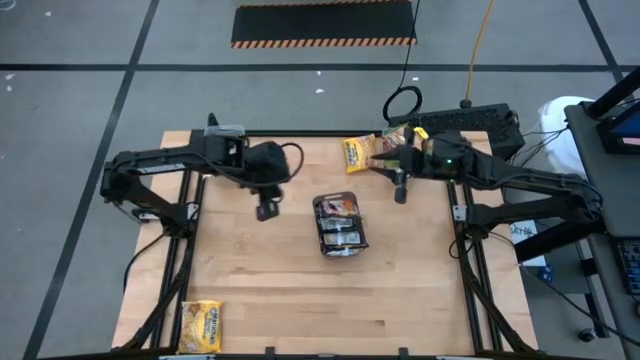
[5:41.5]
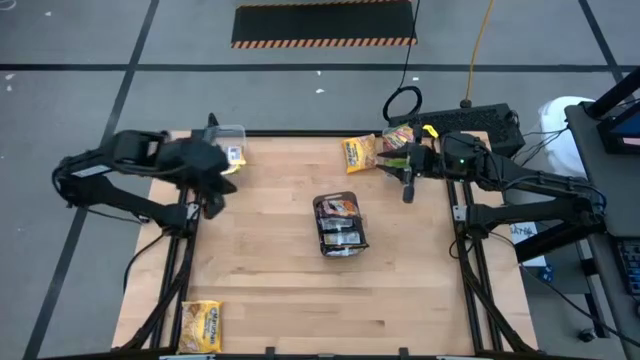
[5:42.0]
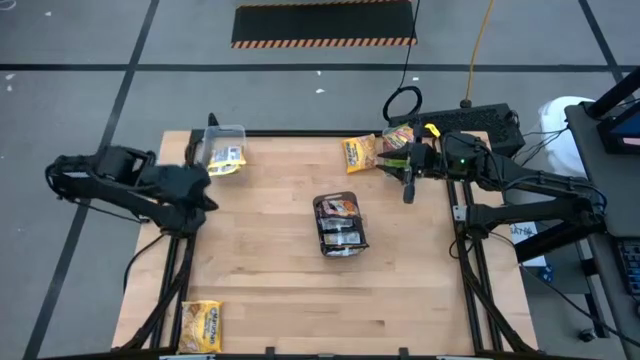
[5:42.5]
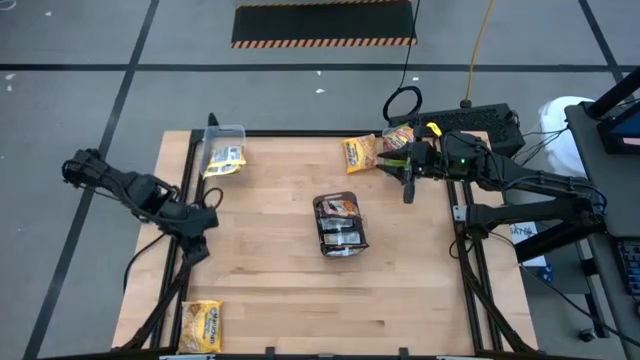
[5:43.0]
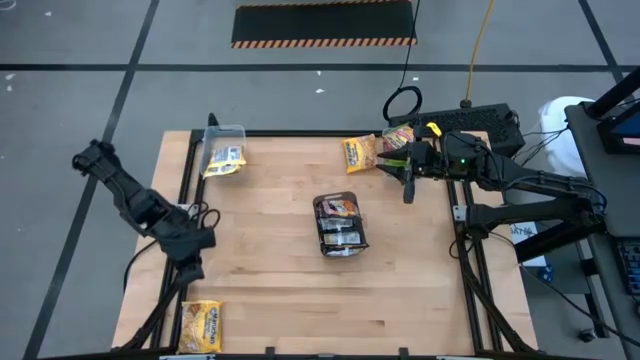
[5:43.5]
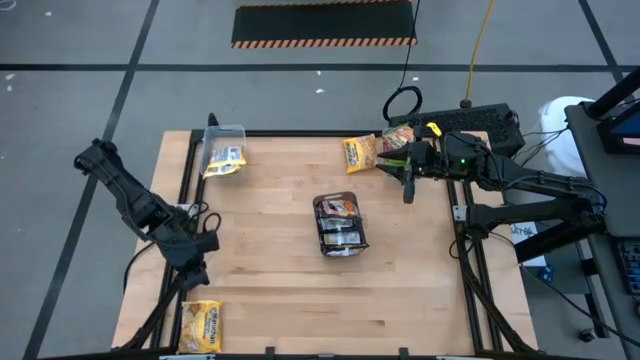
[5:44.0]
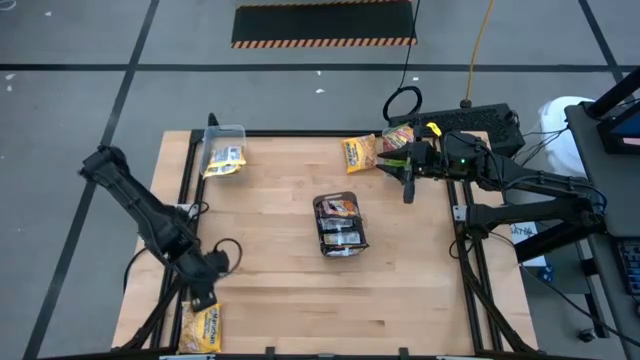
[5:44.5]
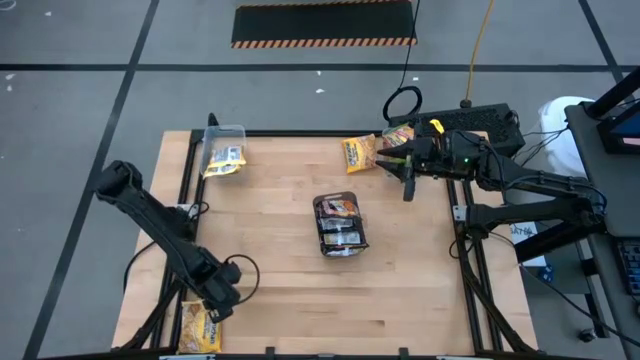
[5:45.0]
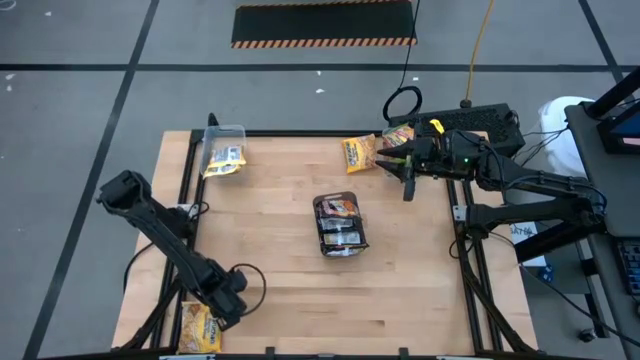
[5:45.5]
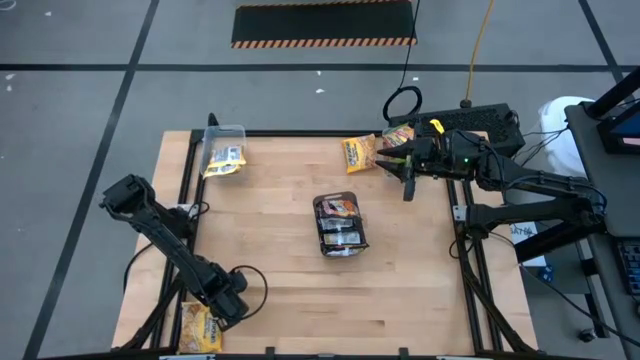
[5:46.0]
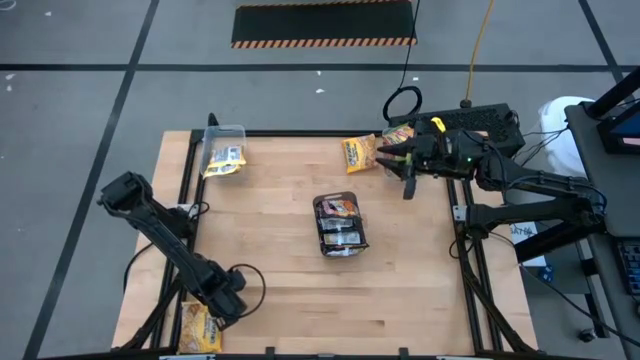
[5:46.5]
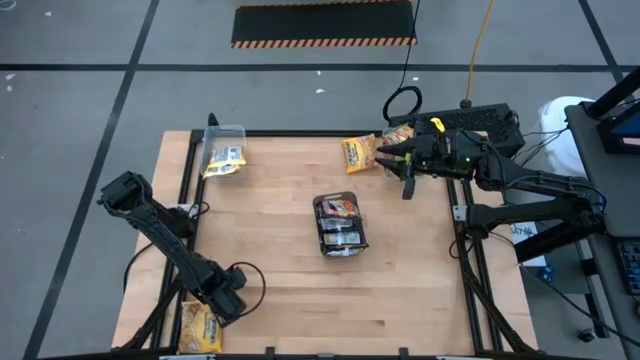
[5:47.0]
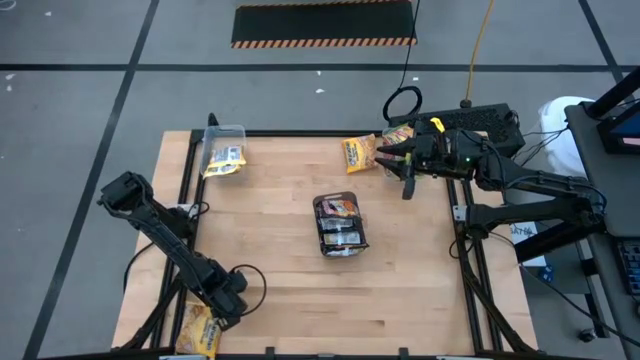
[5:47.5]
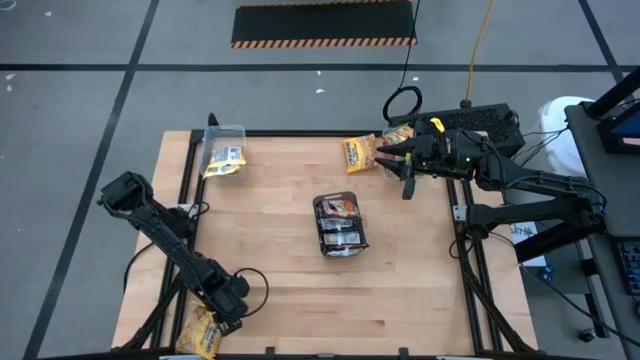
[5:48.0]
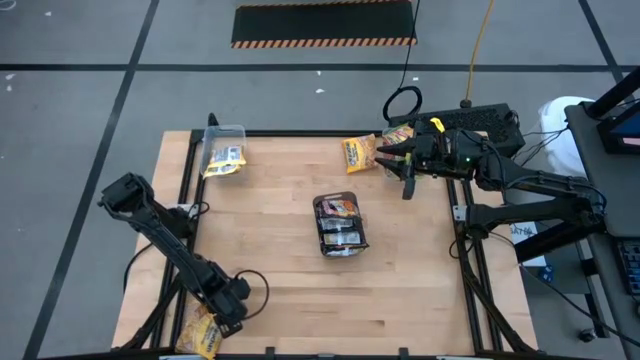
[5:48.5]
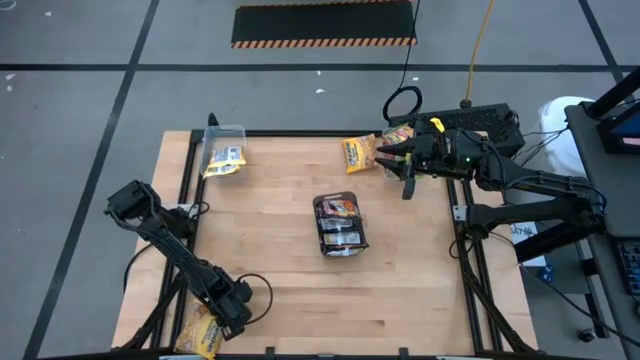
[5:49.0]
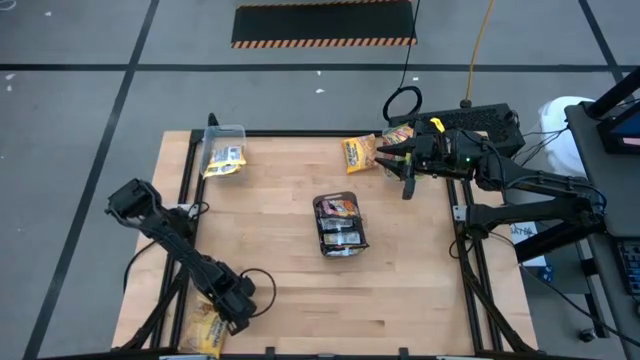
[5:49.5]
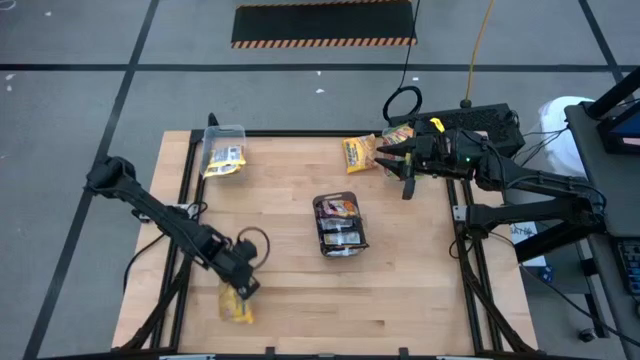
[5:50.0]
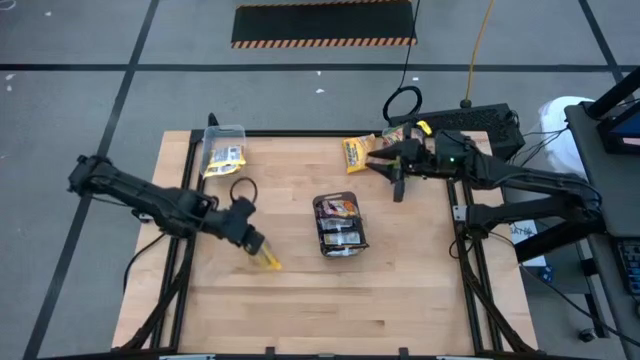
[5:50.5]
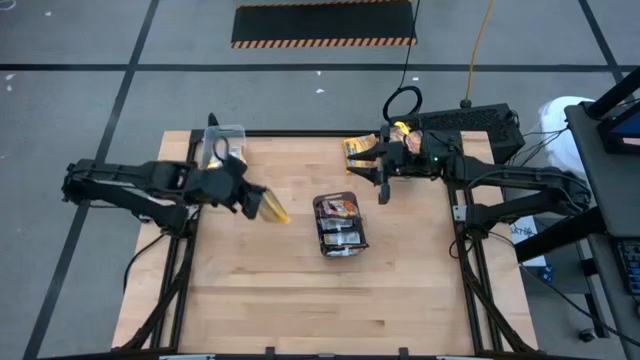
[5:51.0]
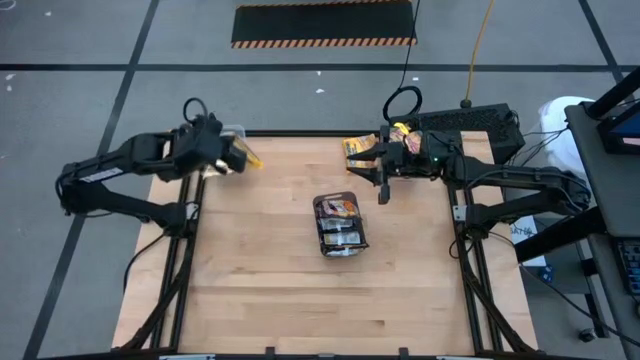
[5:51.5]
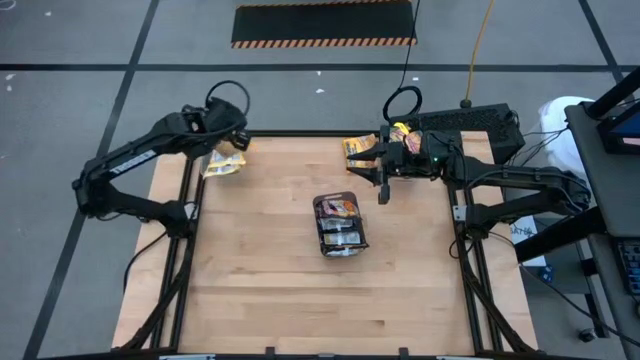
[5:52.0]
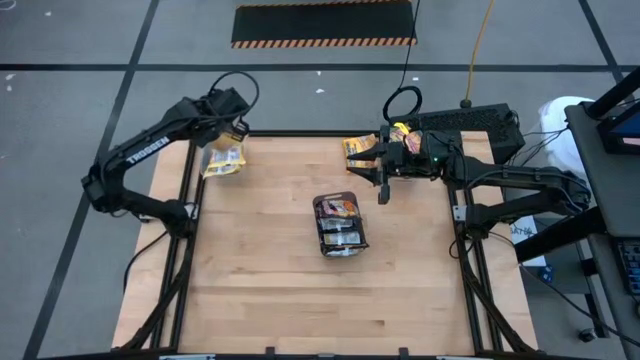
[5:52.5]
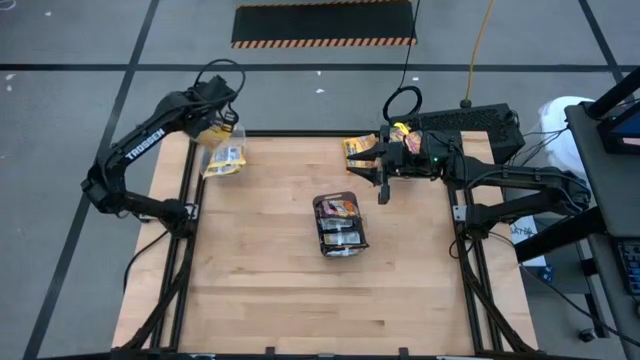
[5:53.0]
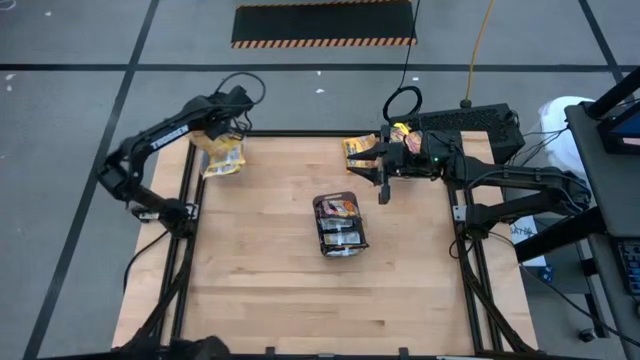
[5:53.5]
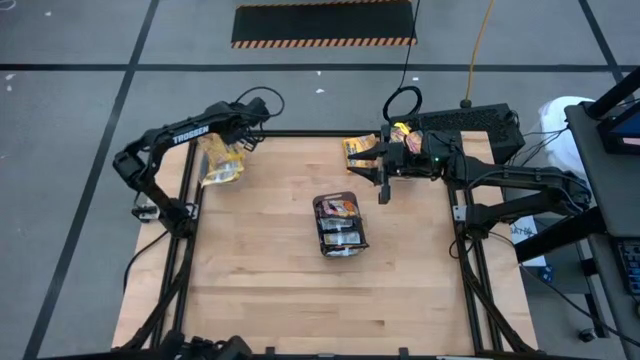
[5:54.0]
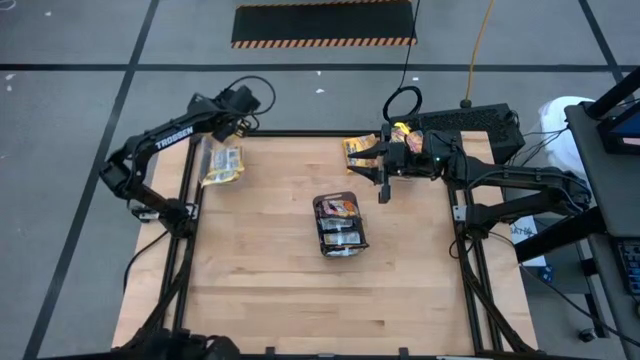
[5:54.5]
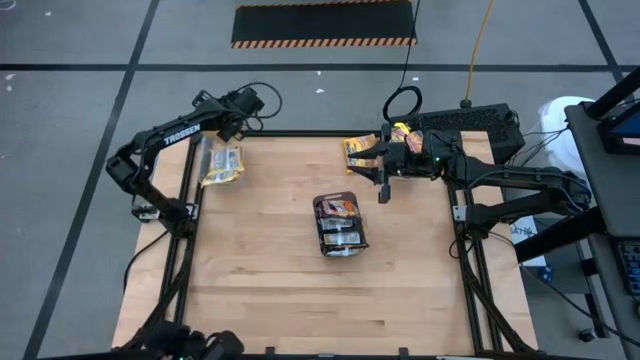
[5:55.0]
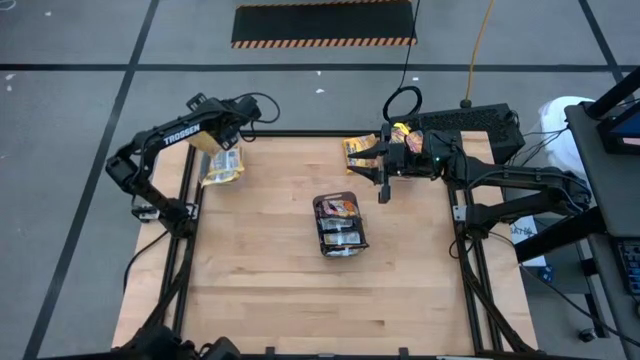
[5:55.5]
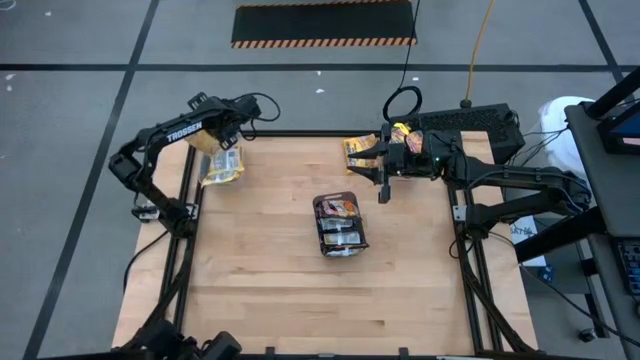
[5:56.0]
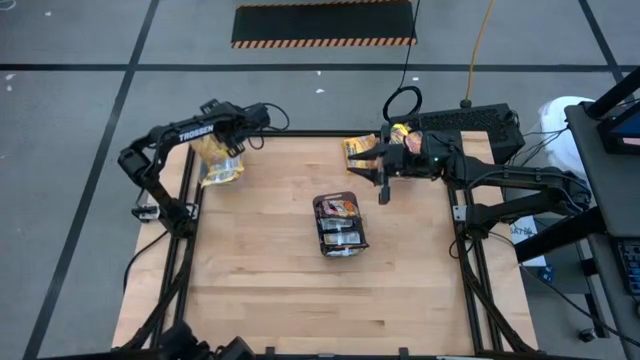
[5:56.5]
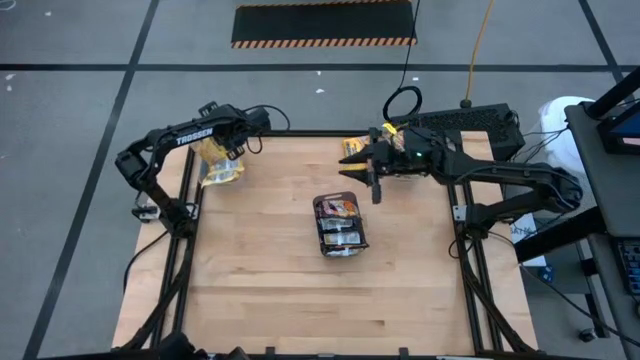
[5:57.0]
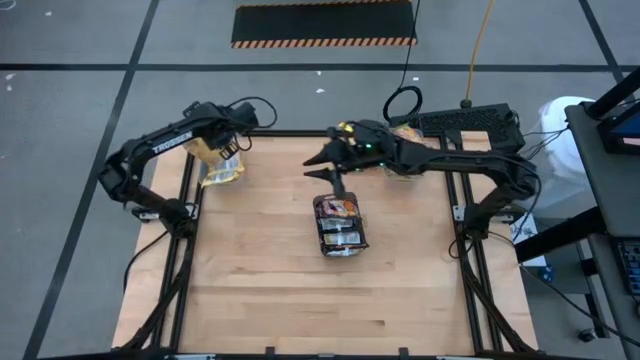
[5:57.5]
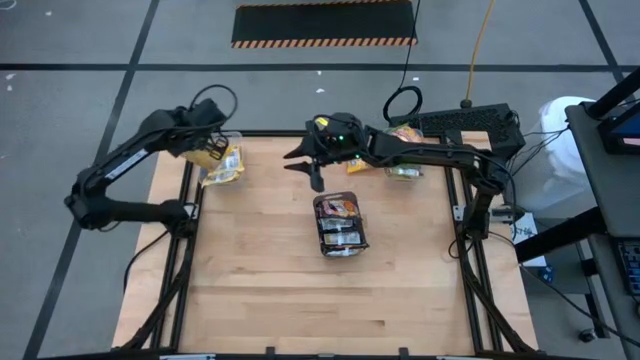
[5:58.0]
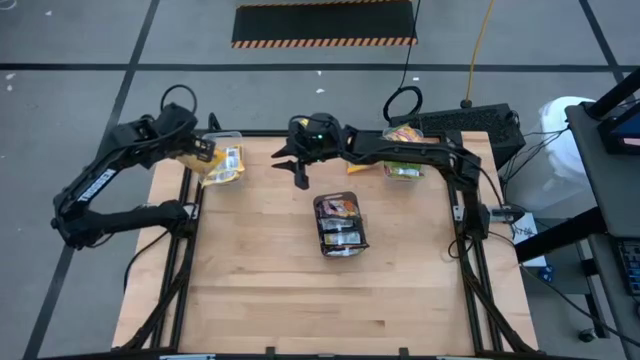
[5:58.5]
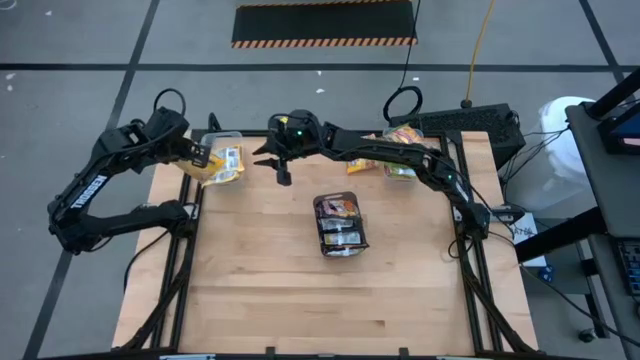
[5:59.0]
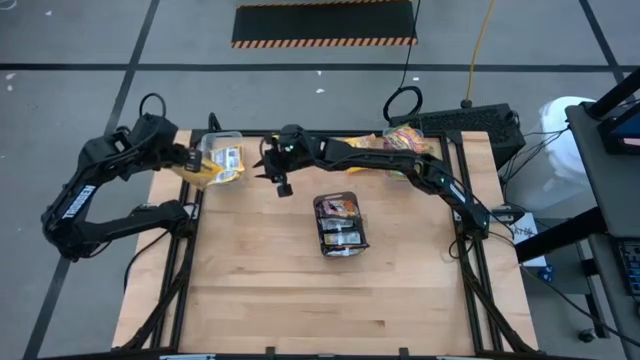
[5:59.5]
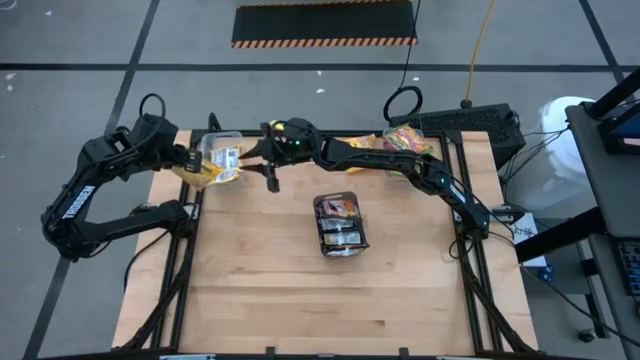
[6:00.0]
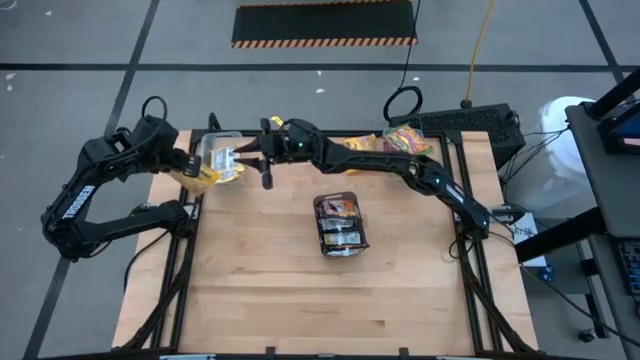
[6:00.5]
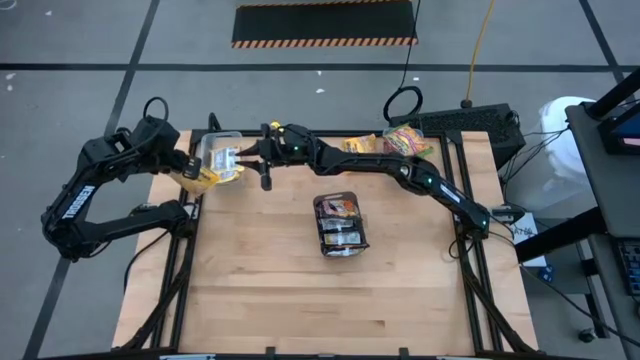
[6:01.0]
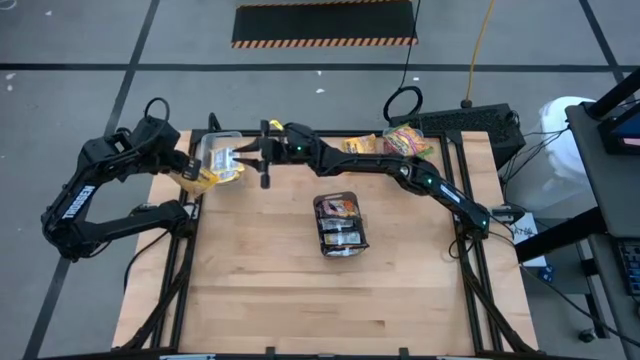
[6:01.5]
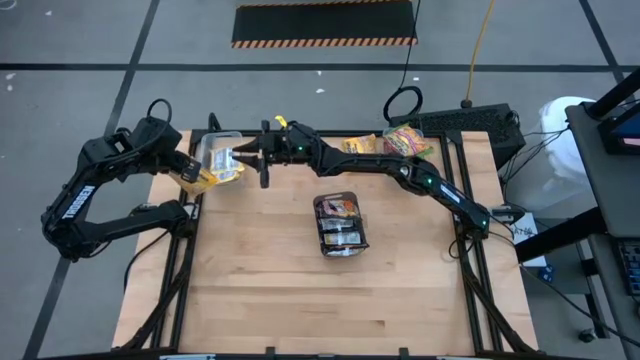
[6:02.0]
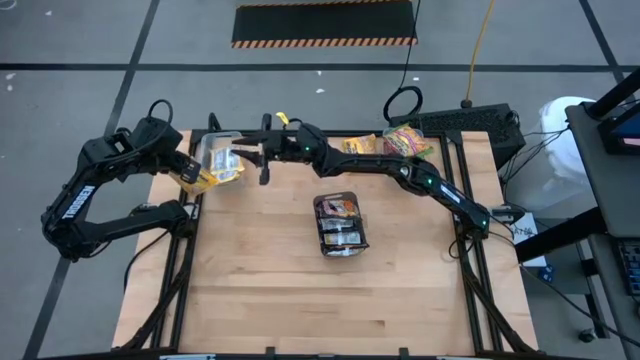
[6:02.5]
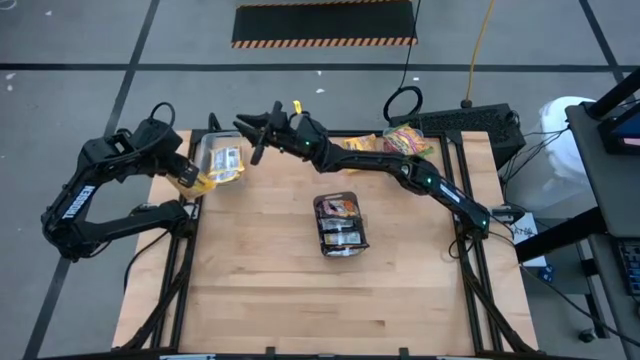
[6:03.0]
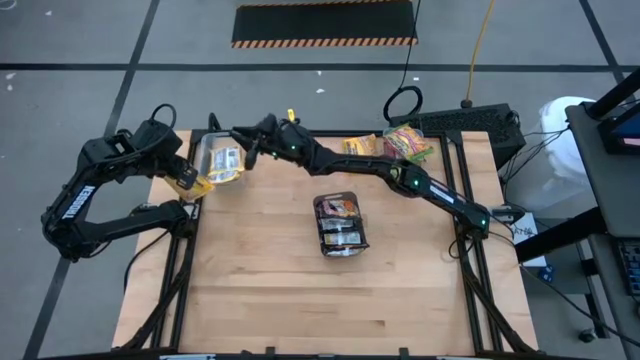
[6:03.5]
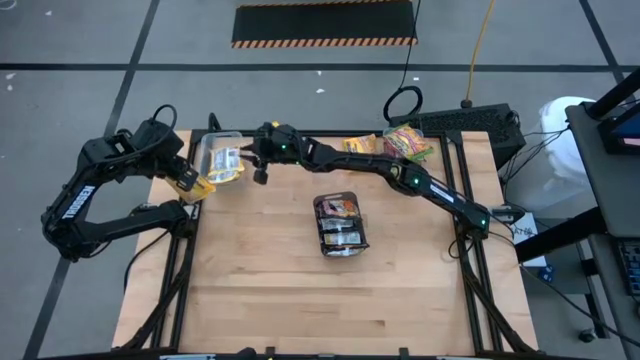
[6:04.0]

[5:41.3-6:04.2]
Task: Sort Maruchan noodles
Put the bottom yellow noodle pack into the left transparent bin
